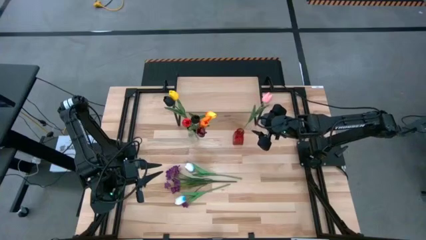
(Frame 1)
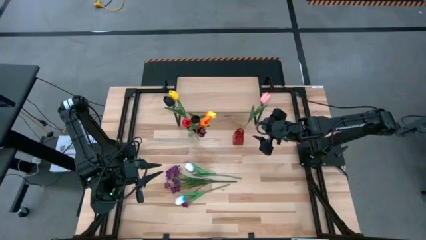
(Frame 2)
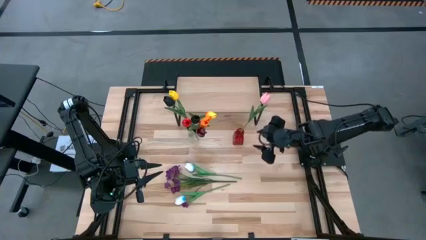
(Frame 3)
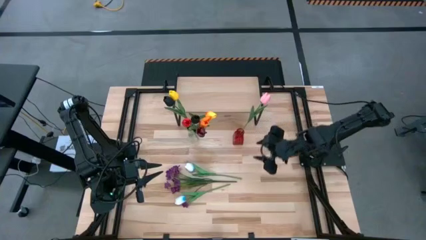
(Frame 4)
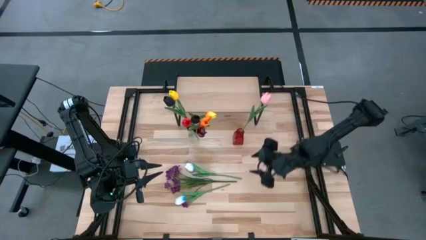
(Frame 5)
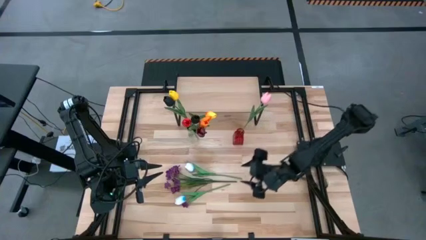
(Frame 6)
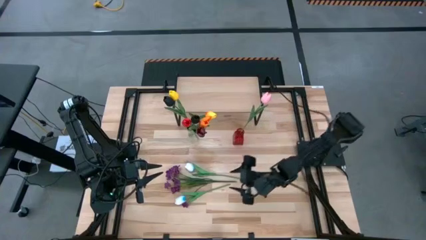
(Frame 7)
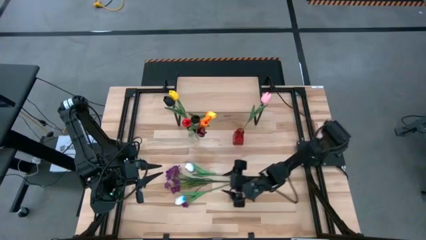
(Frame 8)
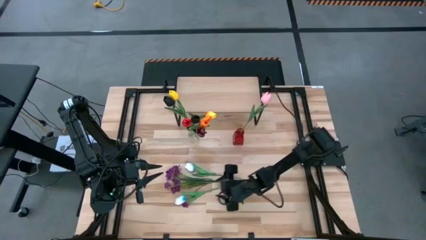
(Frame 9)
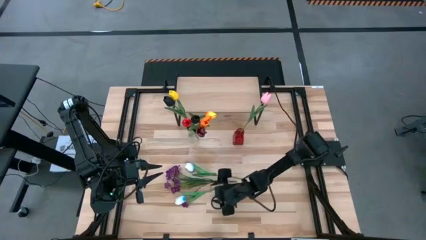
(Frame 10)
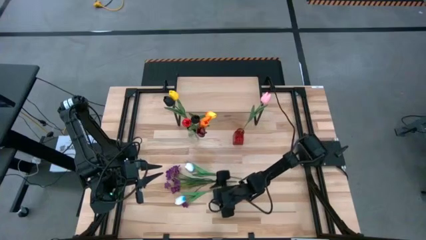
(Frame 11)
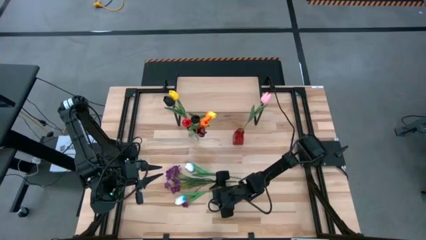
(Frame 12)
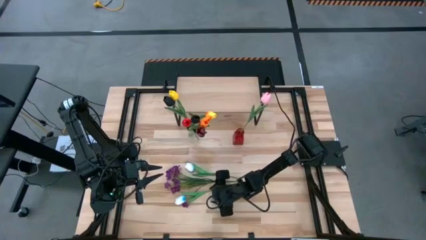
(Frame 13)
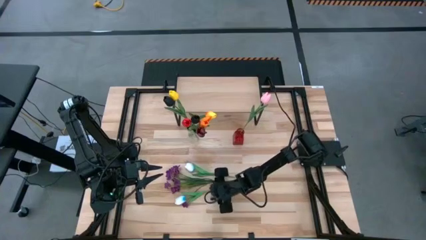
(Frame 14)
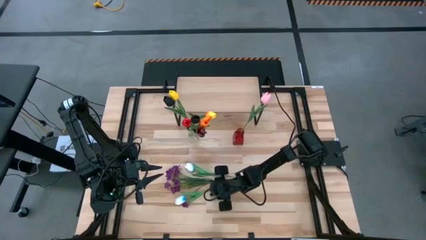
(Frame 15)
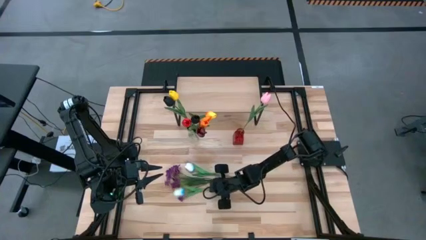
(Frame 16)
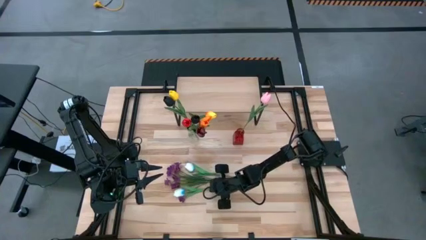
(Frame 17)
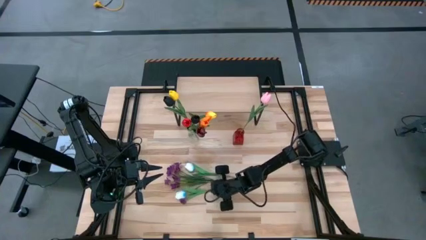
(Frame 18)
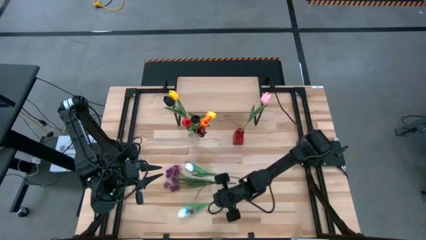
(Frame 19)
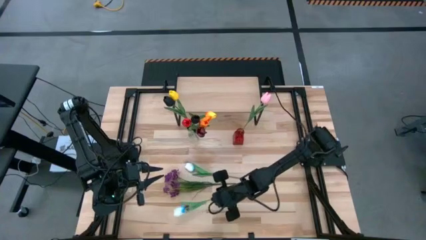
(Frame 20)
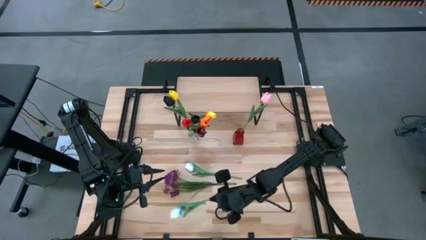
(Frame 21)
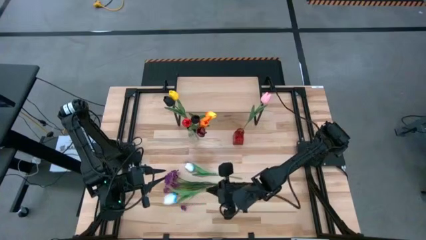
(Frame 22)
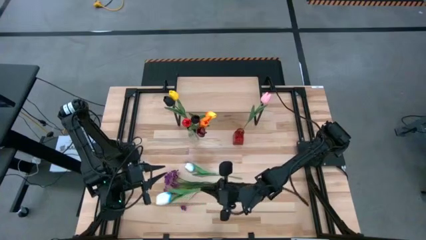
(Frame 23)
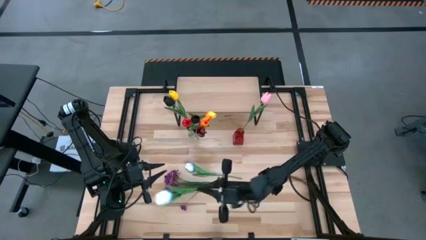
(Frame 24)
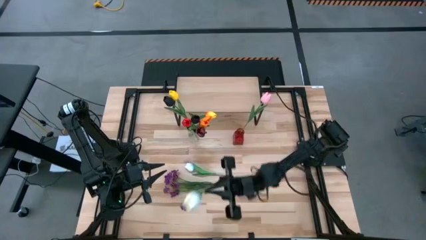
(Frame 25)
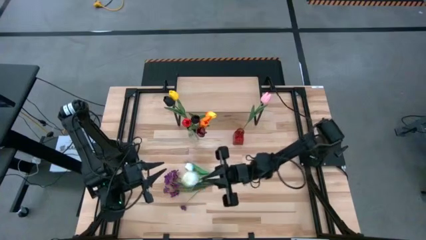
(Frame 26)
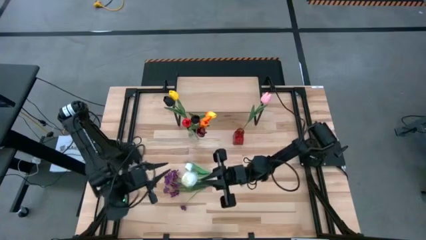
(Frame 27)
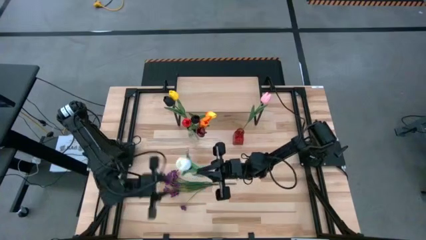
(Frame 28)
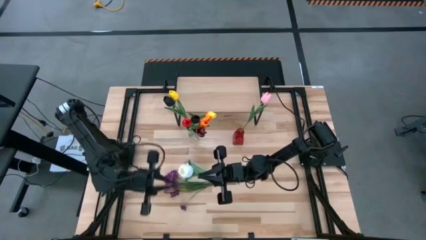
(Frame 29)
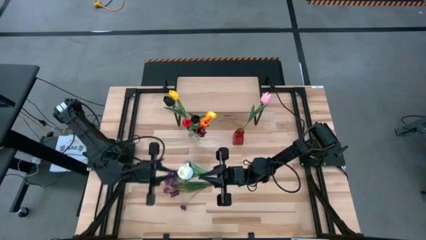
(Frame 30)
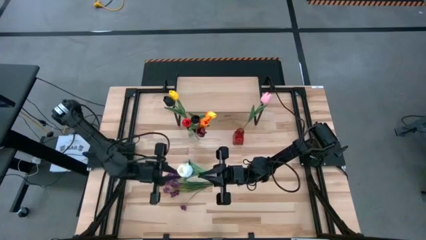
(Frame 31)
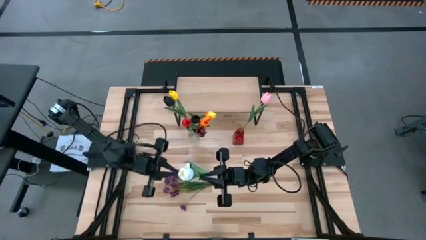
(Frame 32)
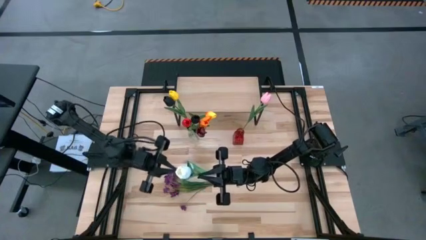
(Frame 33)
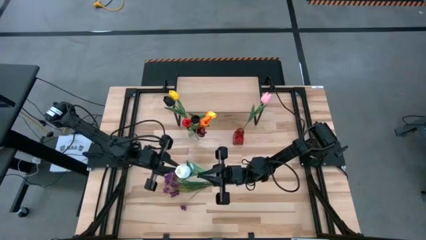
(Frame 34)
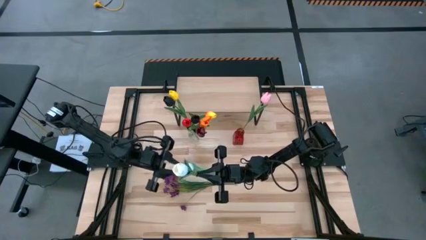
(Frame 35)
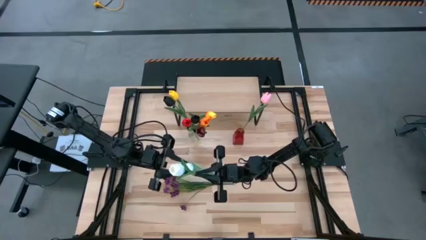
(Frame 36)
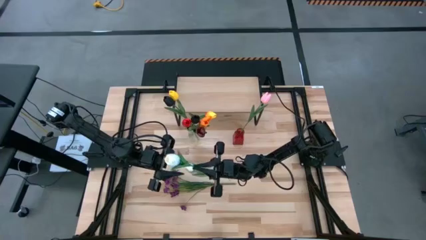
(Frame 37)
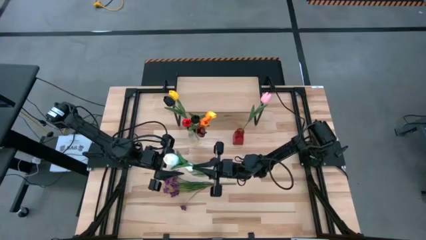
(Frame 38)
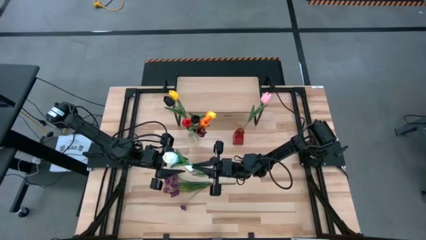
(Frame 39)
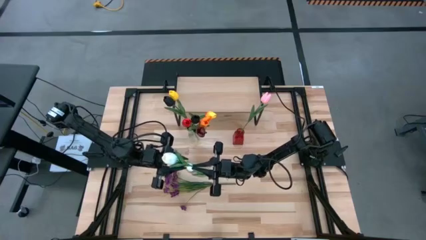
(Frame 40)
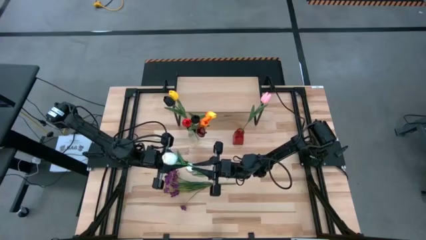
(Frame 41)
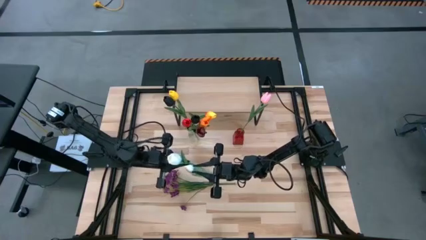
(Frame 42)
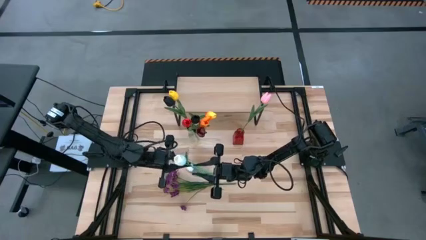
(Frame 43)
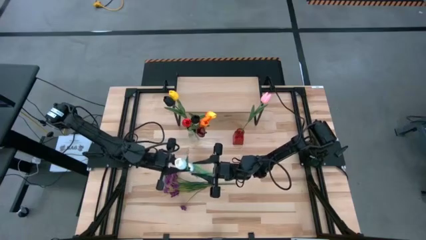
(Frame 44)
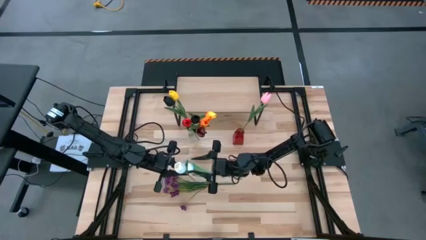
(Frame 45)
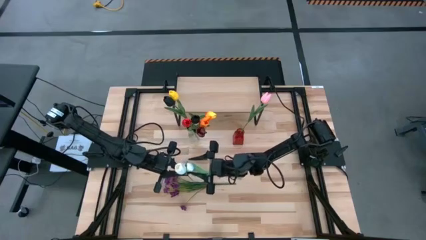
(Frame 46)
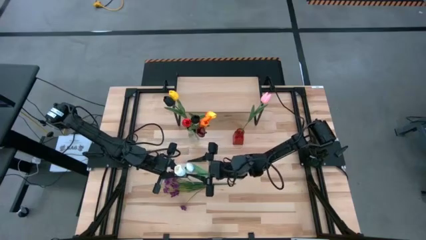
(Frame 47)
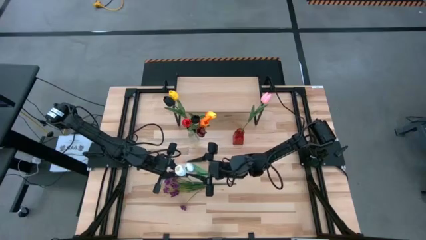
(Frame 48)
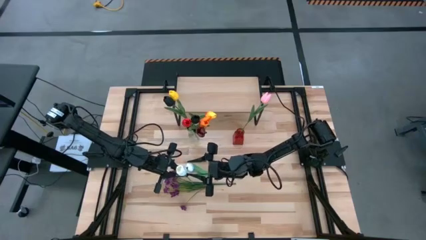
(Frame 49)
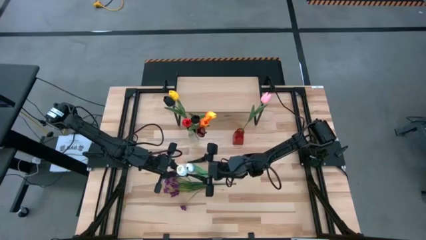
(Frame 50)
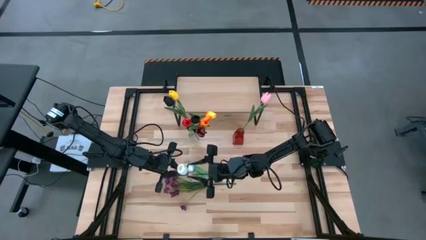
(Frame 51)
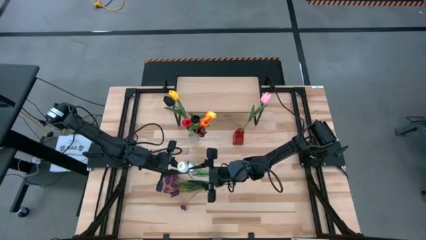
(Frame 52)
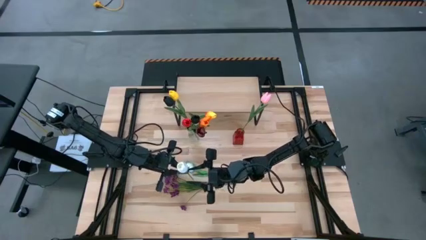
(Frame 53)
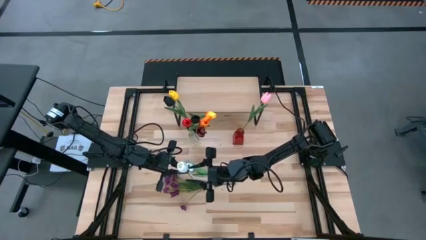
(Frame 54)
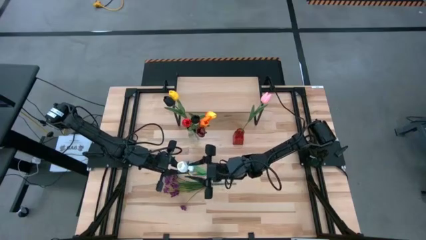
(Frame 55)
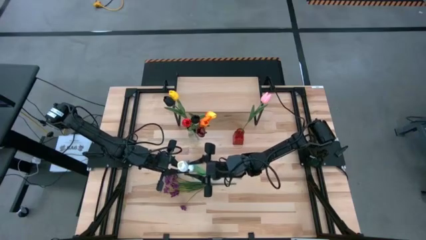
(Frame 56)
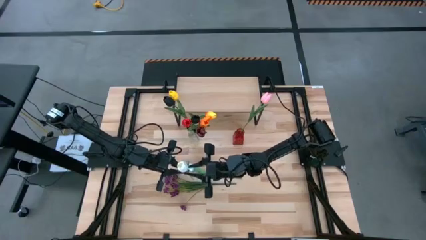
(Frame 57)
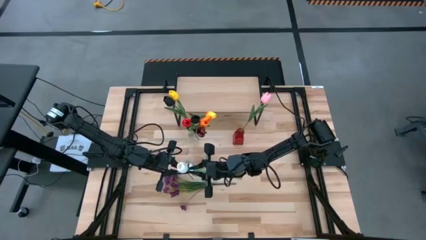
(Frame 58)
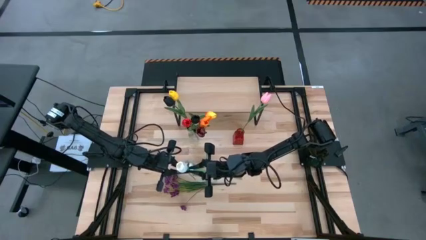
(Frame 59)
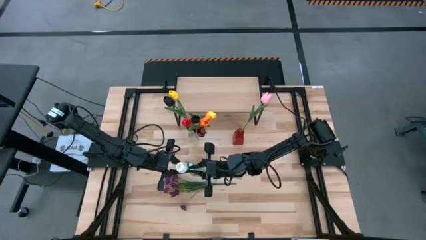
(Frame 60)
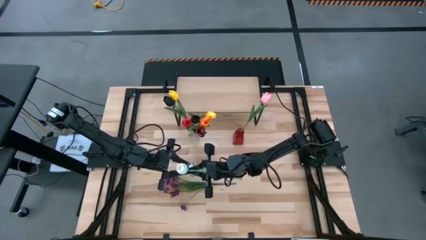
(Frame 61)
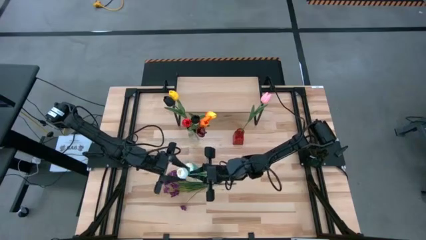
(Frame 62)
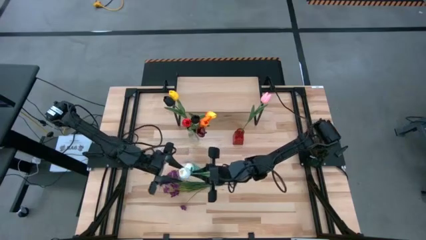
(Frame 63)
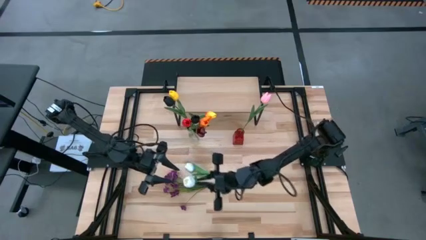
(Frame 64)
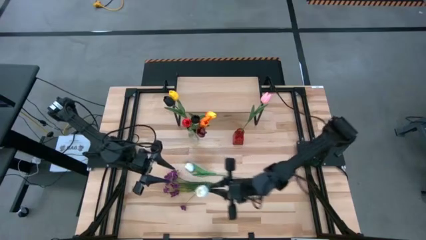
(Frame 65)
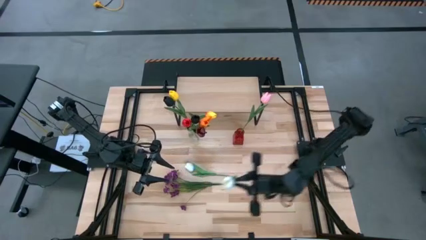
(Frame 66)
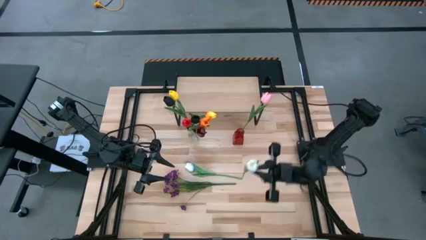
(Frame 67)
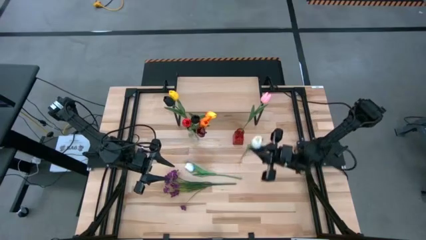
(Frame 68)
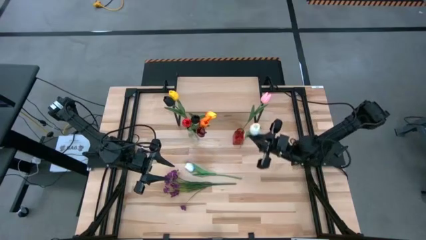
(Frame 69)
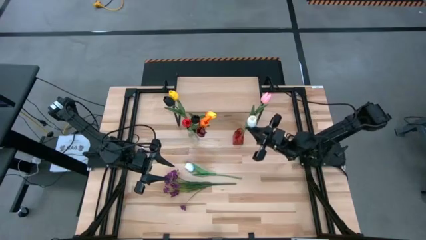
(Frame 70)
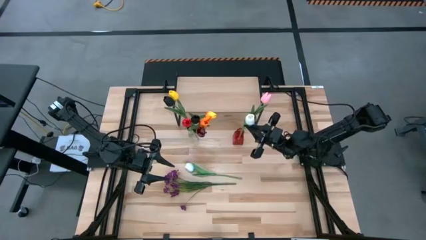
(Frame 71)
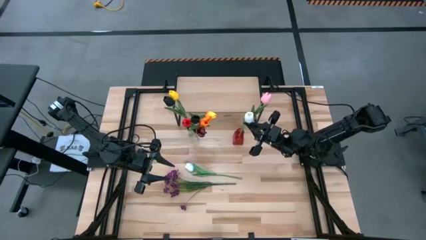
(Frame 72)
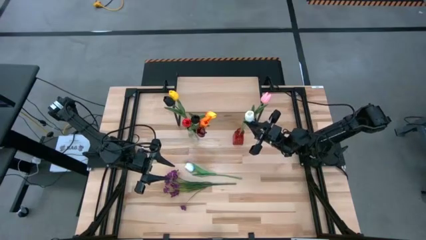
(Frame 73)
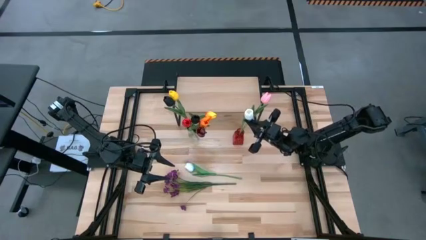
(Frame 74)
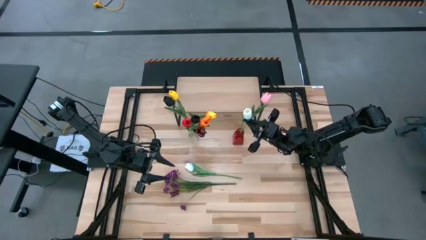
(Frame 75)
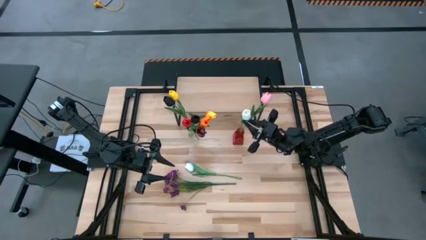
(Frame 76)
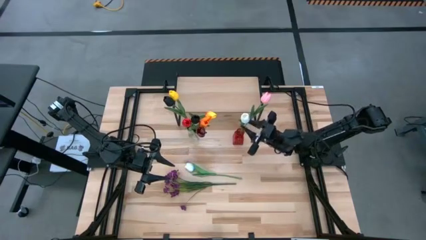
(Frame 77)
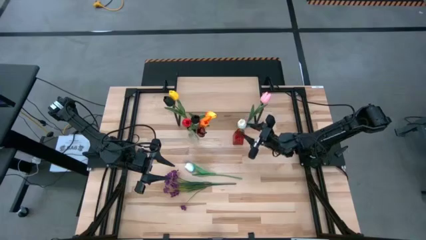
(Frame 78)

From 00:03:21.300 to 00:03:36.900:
Task: Pick and place flowers into a vace then onto a shelf
Put the bottom blue tulip into the red vase

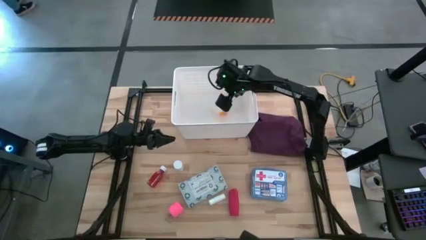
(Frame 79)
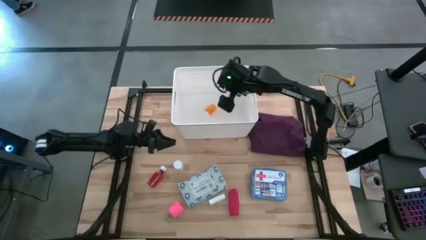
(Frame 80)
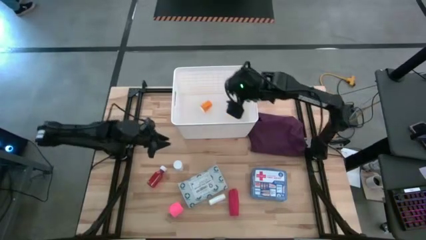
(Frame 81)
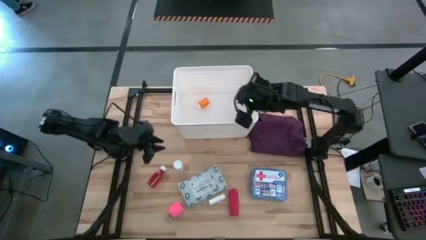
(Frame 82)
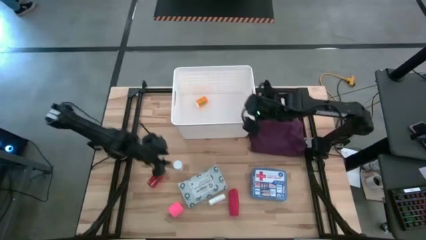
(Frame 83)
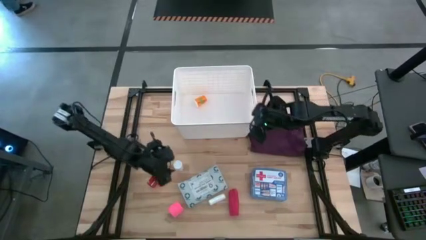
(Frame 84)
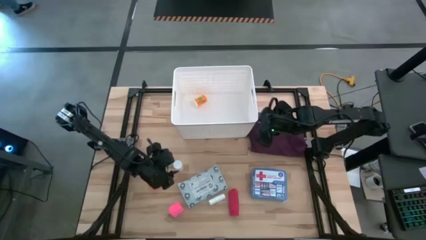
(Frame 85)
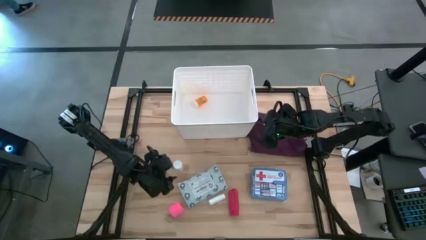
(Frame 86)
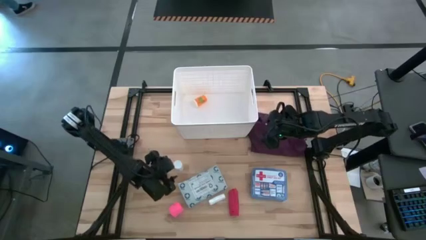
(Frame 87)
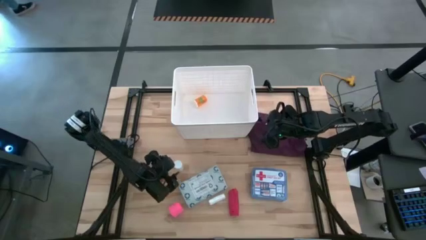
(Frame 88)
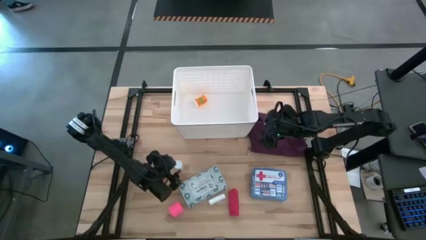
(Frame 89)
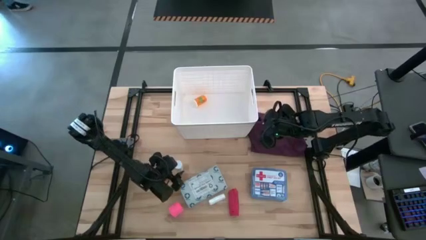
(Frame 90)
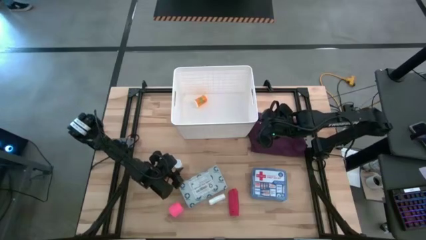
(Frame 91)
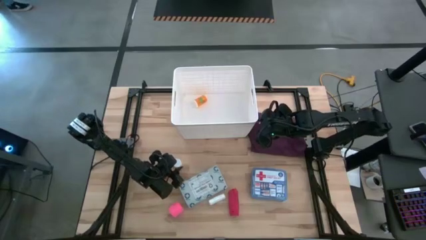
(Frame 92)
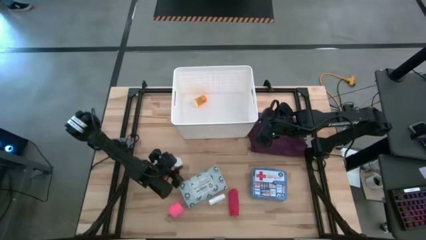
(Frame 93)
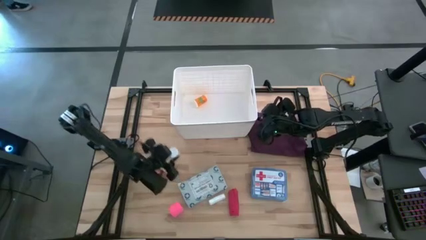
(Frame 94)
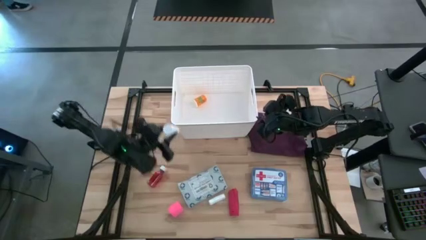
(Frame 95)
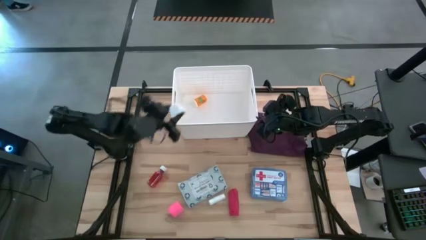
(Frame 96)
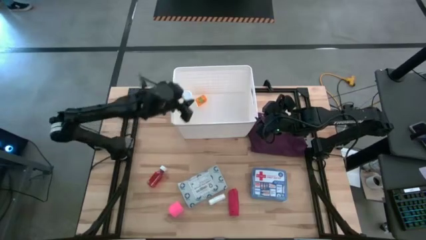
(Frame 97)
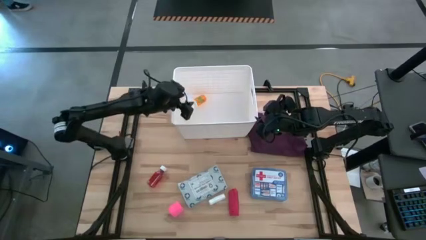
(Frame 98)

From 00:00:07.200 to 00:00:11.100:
Task: Pick & place medical supplies in basket/bin
Put the white pill bottle into the white bin
